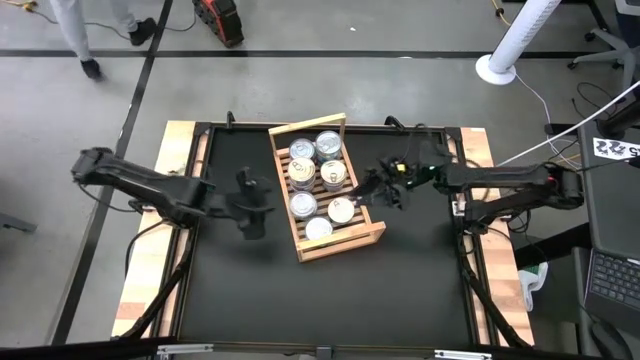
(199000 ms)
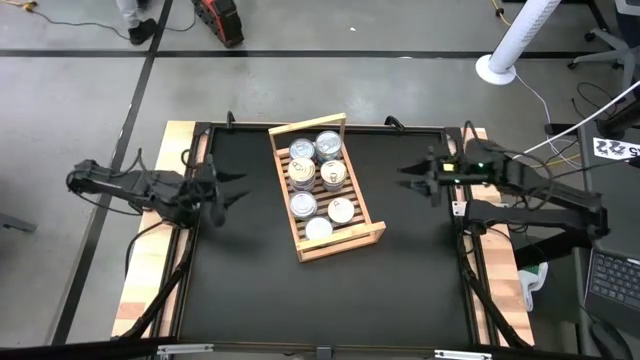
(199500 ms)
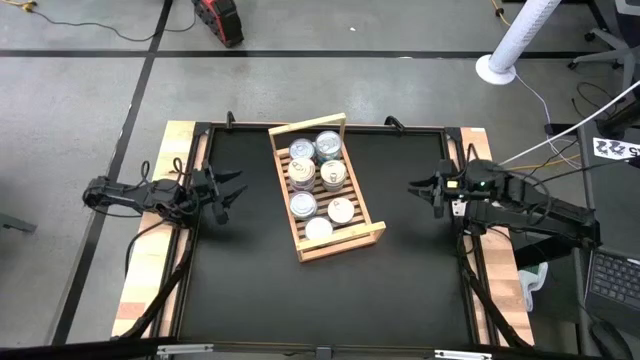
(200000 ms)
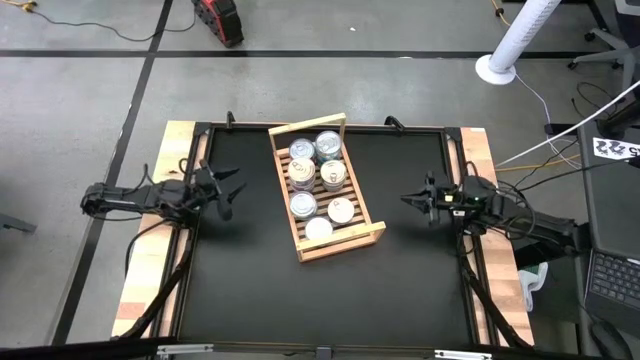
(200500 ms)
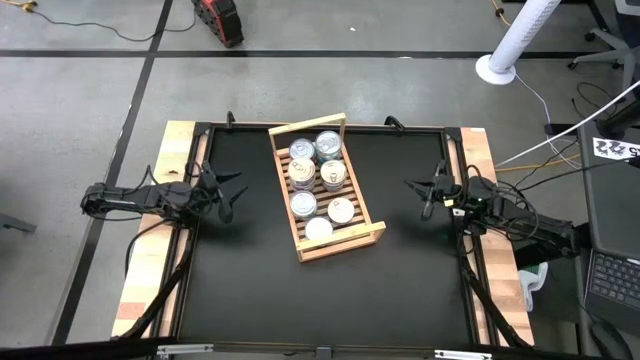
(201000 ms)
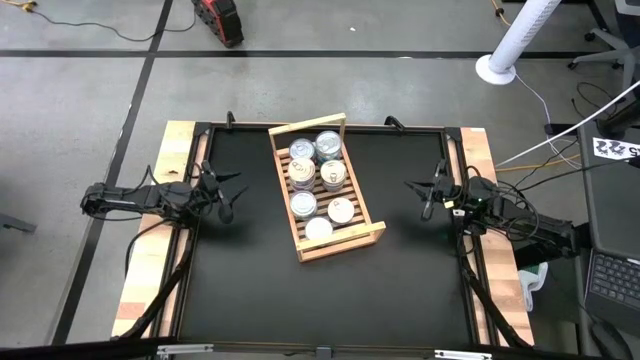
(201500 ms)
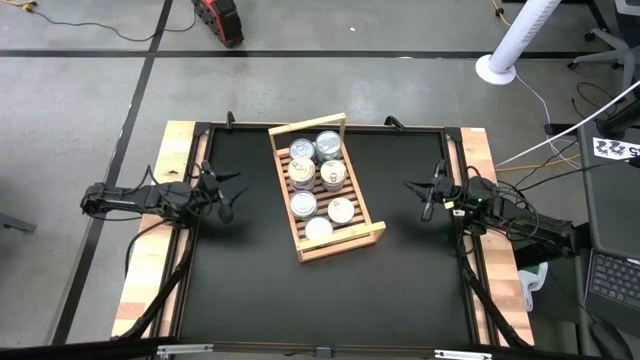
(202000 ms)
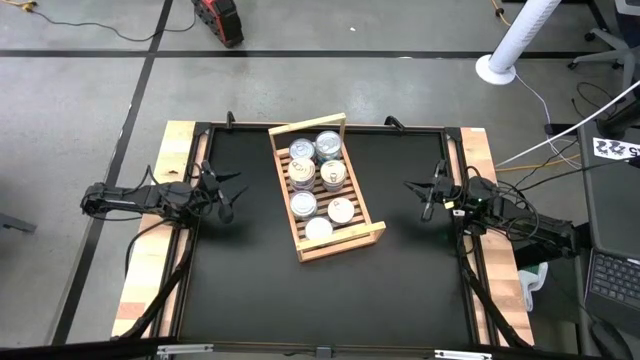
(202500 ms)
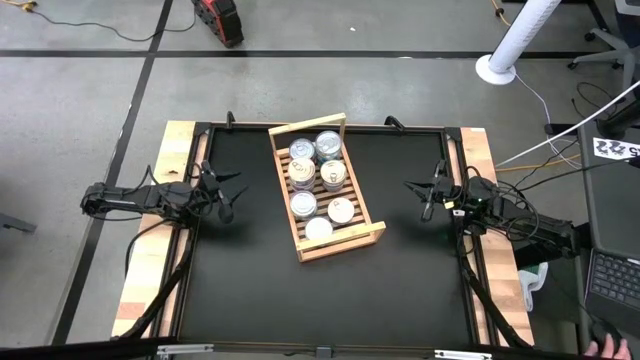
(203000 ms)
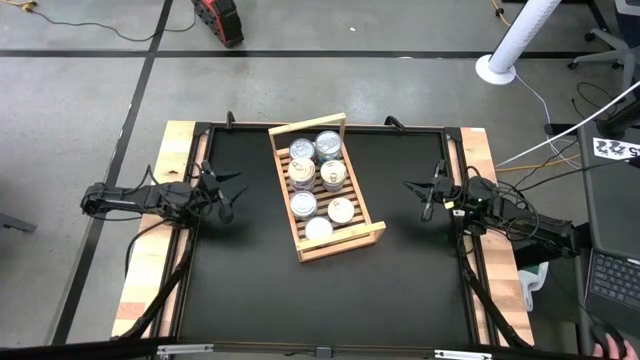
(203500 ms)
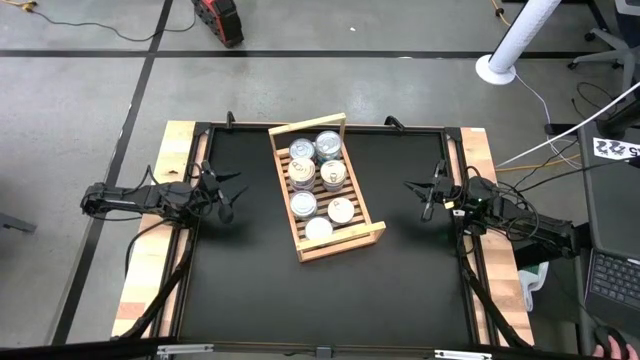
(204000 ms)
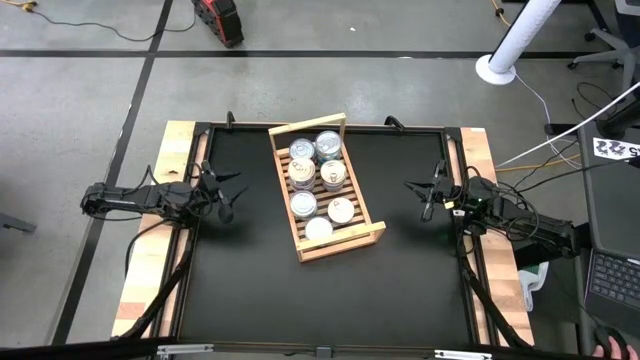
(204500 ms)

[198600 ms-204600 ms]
Task: Stack canned seafood by type on shelf
Return to Home Position

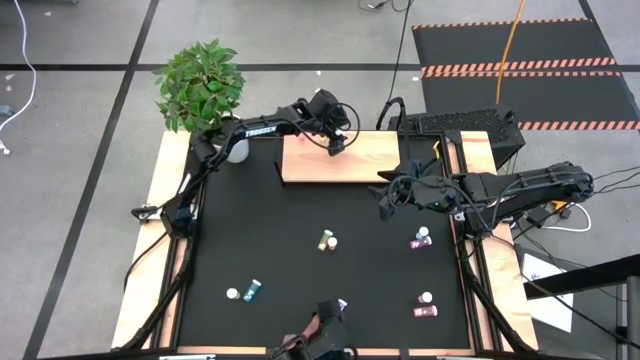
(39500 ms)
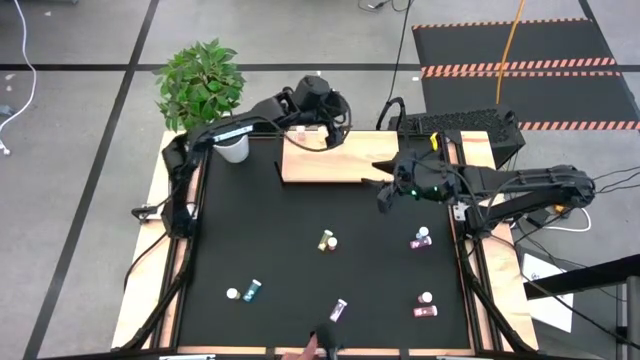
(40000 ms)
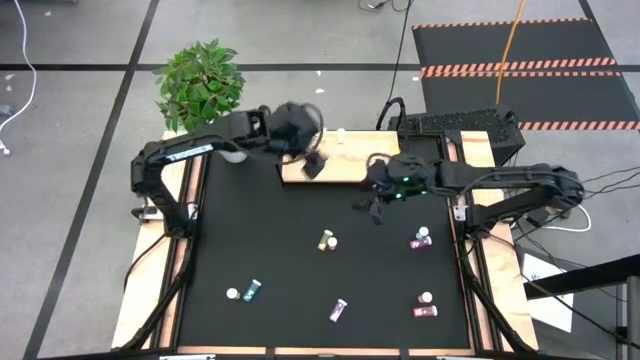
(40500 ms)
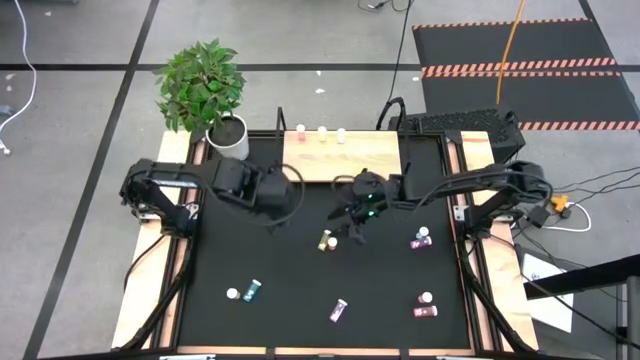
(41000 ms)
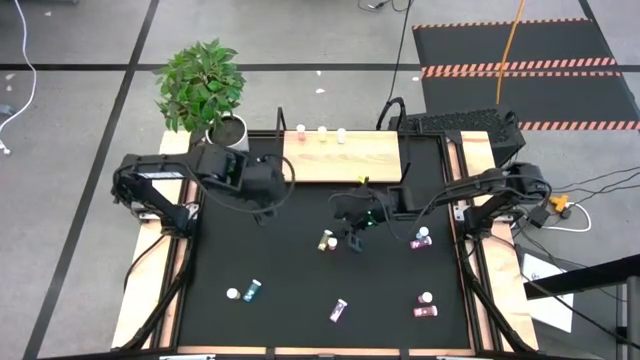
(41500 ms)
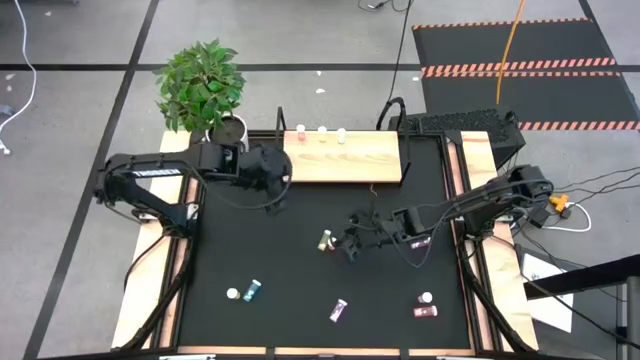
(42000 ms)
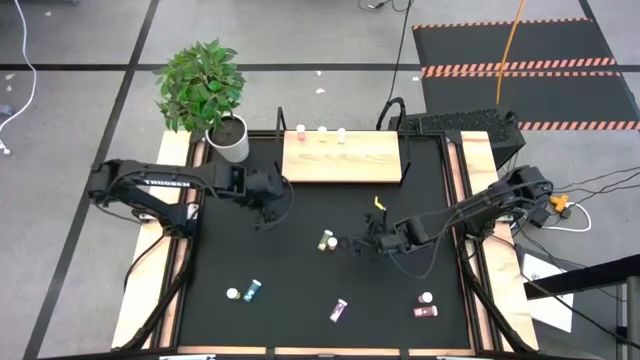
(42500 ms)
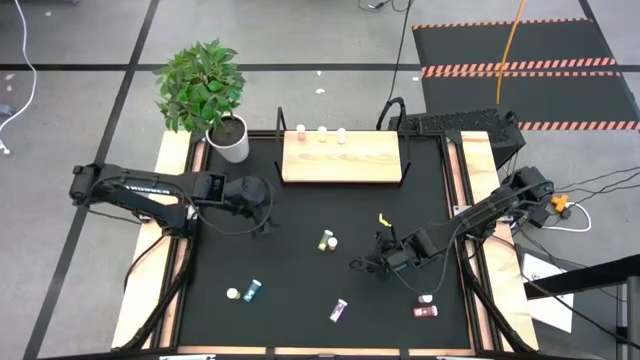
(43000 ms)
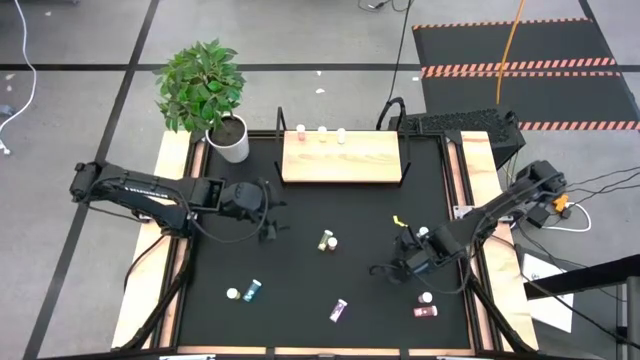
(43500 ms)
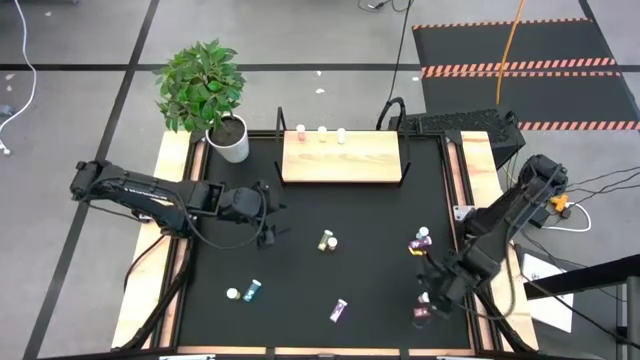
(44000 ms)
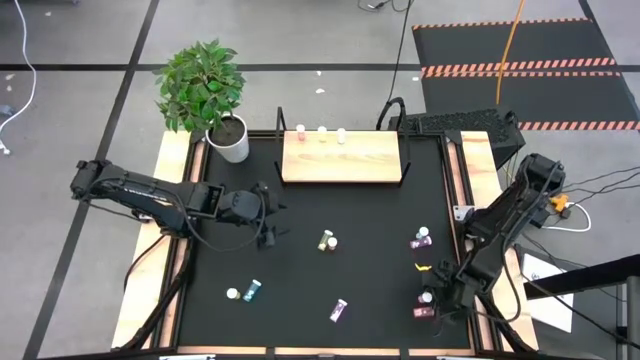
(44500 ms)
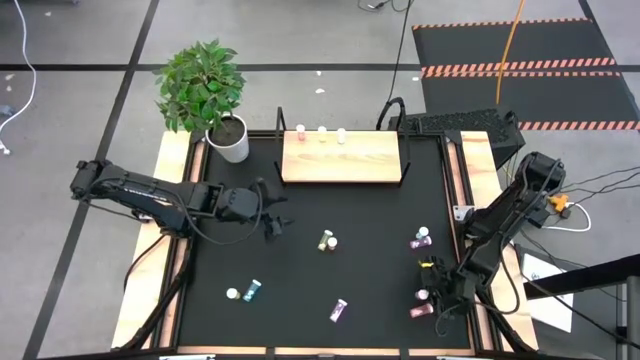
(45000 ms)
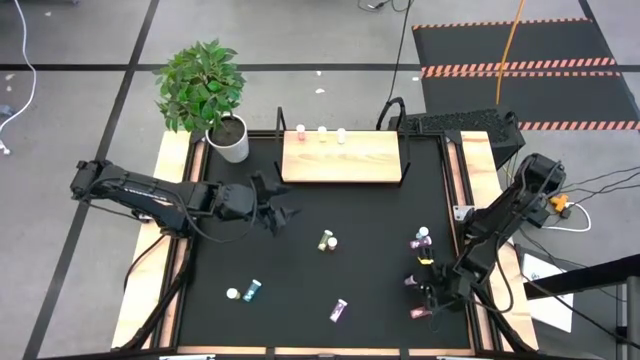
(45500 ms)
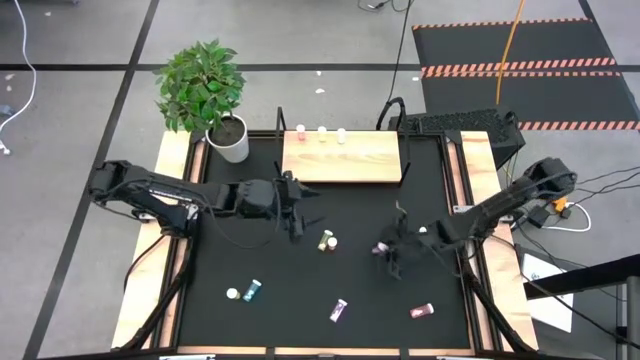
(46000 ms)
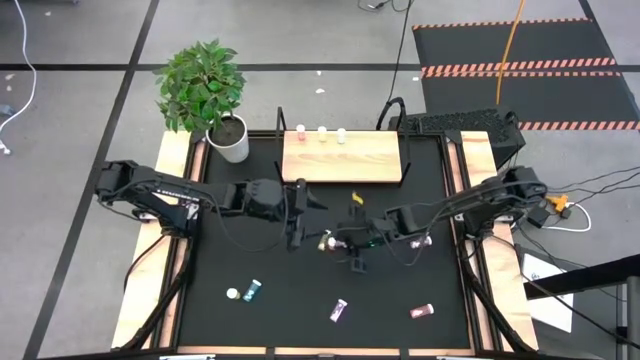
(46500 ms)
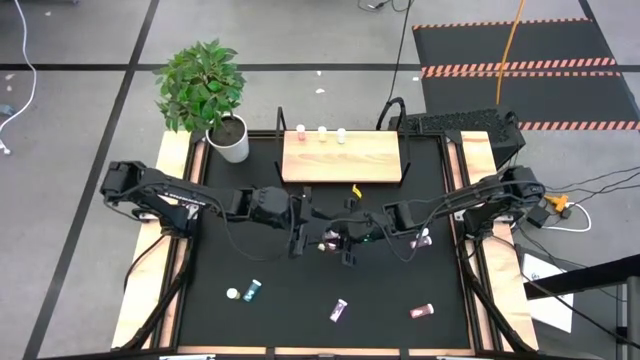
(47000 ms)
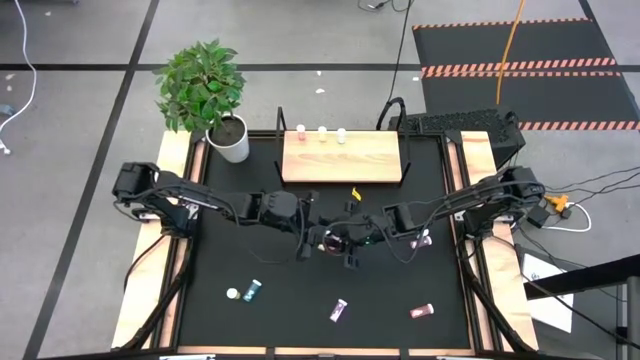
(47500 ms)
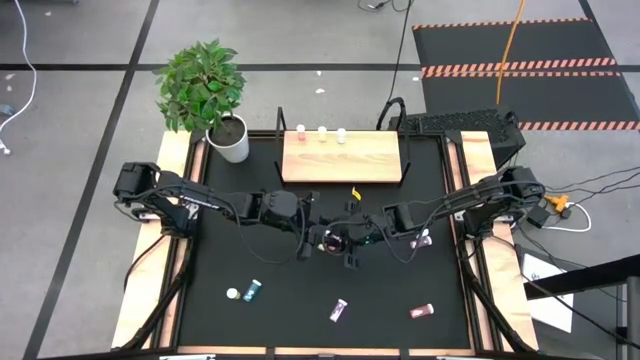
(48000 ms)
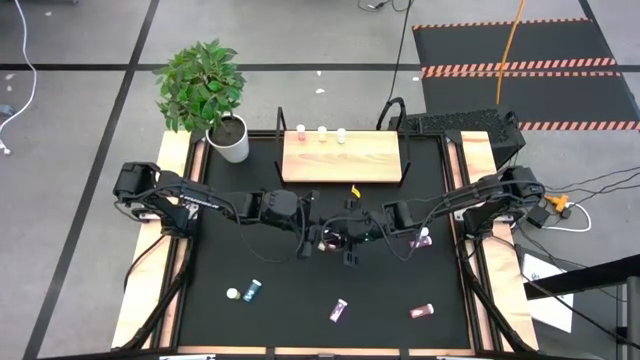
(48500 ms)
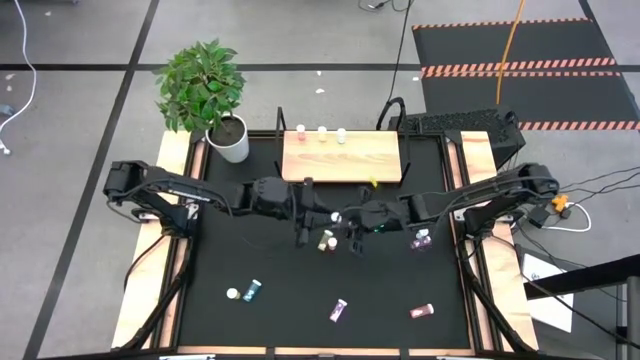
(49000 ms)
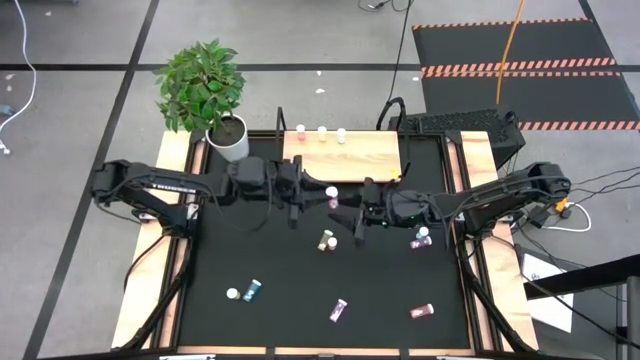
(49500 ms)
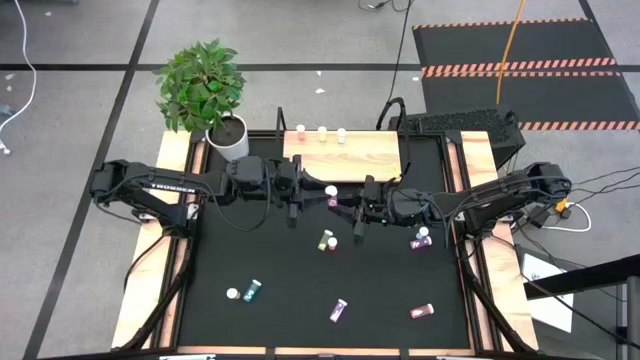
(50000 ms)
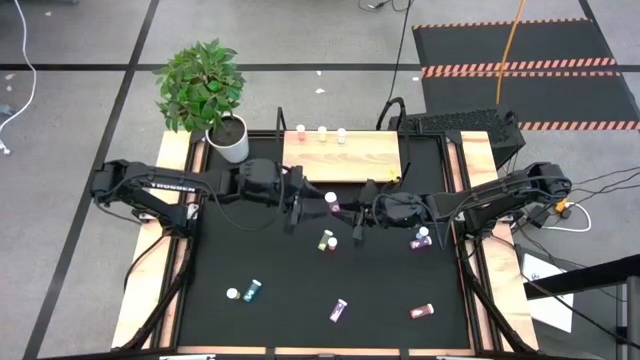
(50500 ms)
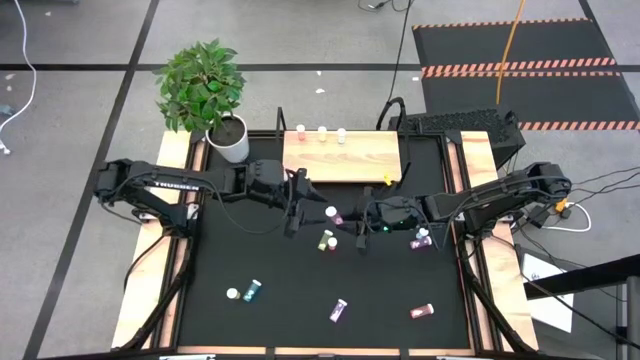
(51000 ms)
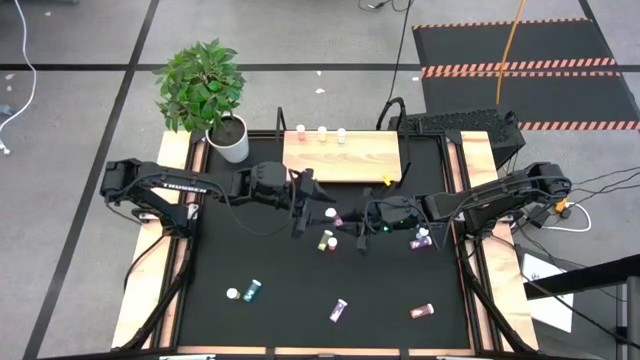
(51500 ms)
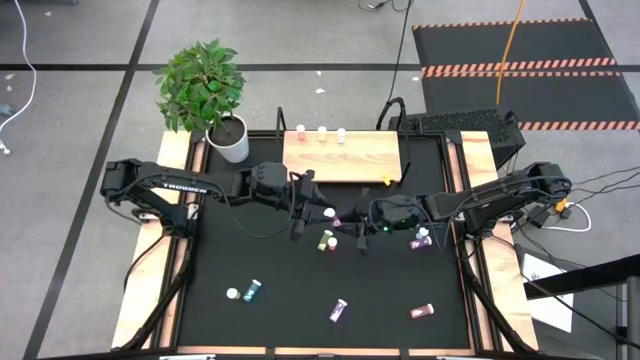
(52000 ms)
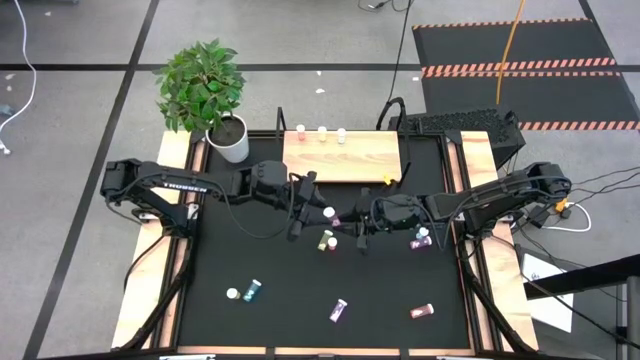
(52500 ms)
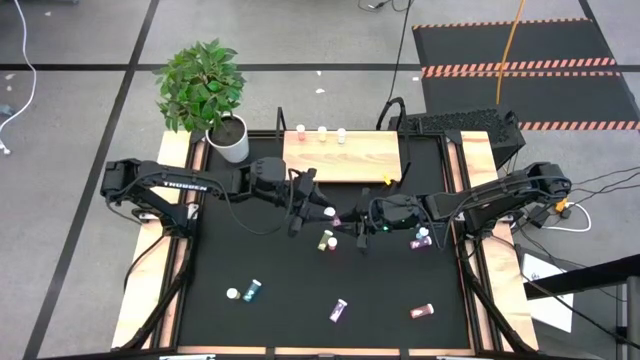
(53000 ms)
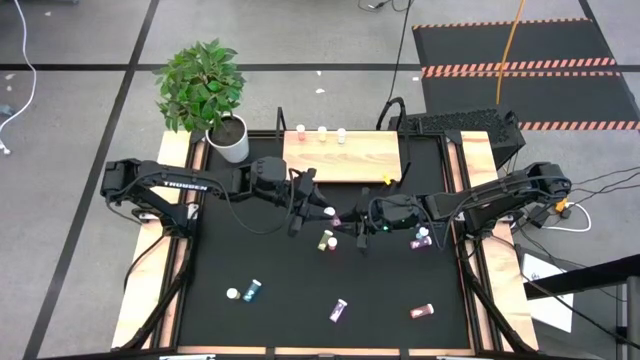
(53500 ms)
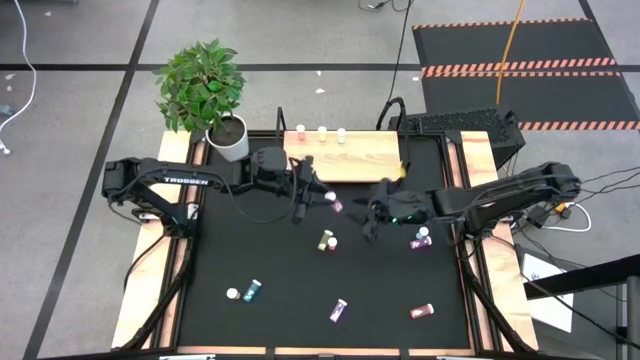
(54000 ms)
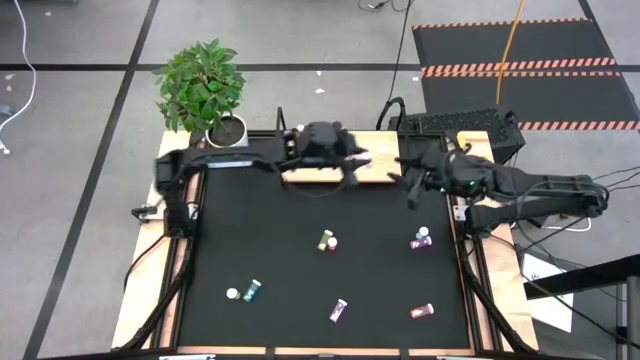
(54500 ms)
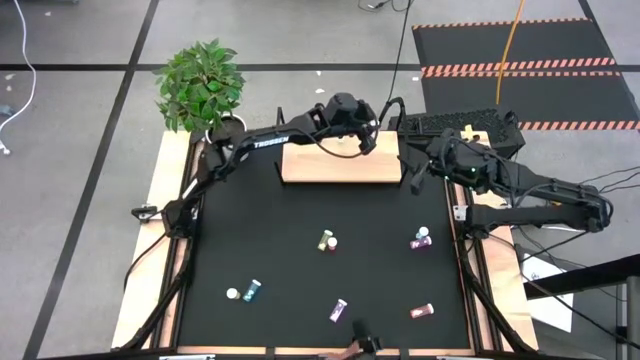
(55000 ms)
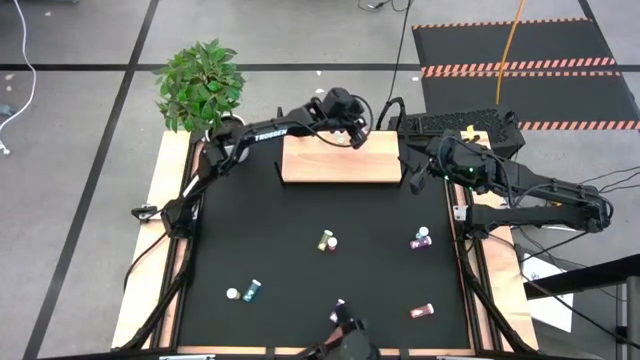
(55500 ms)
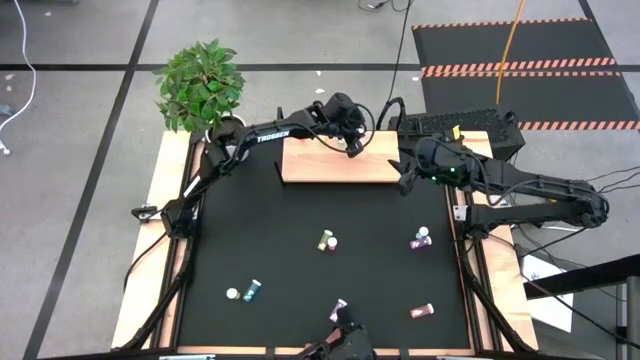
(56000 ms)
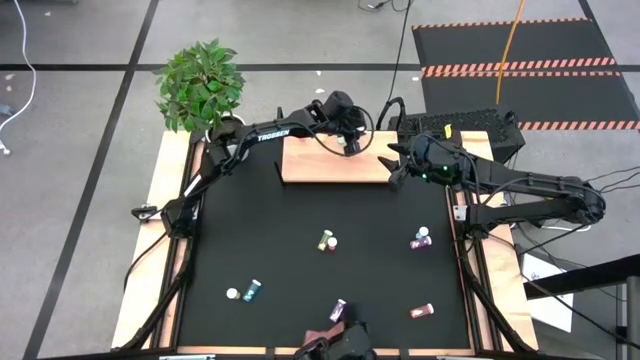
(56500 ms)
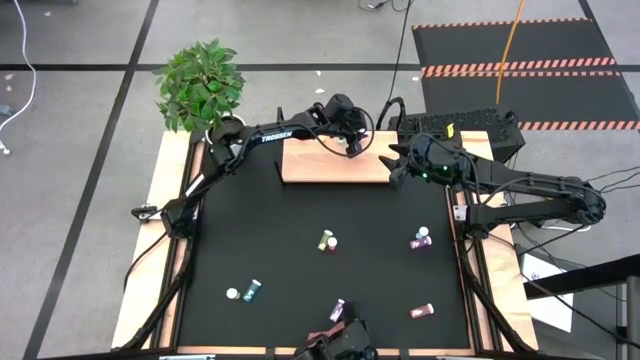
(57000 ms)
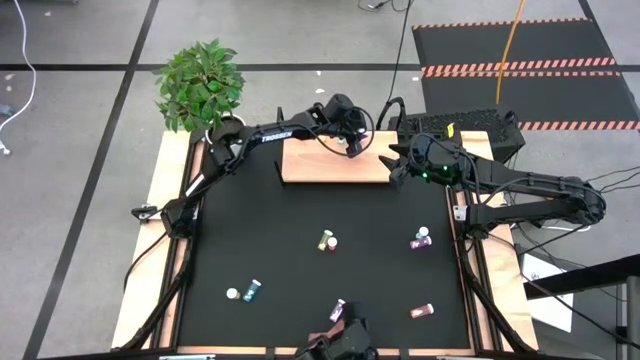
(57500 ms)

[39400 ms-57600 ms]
Task: Pick and place medicine bottles onto shelf by color
Put the bottom right violet pill bottle on the shelf
